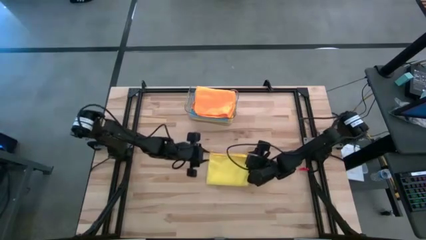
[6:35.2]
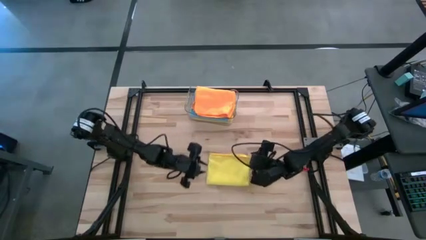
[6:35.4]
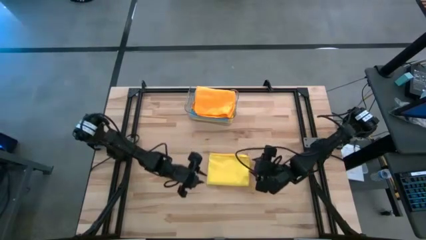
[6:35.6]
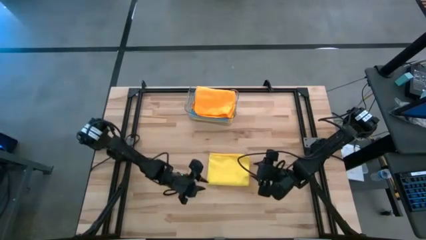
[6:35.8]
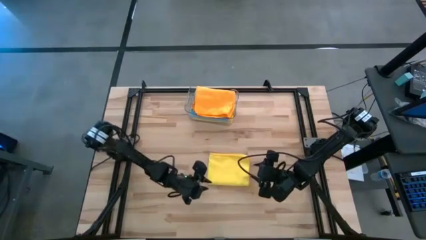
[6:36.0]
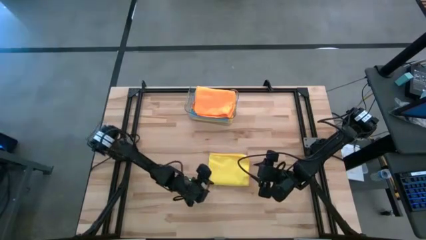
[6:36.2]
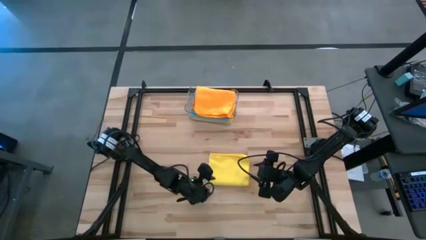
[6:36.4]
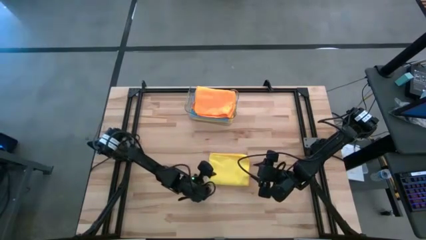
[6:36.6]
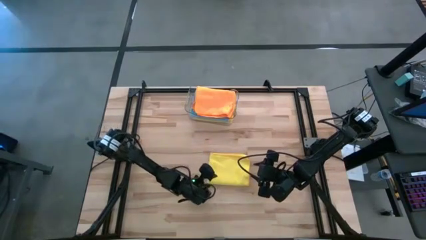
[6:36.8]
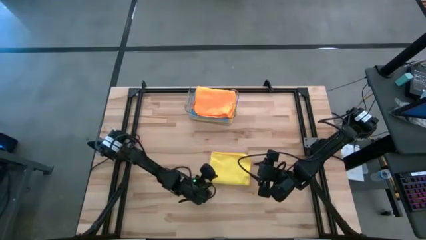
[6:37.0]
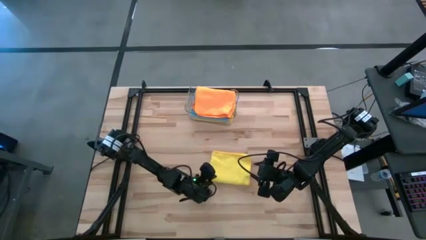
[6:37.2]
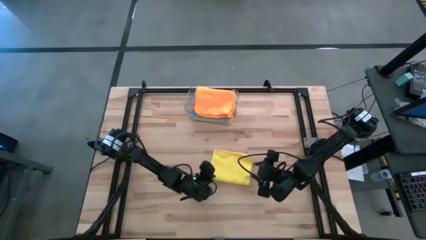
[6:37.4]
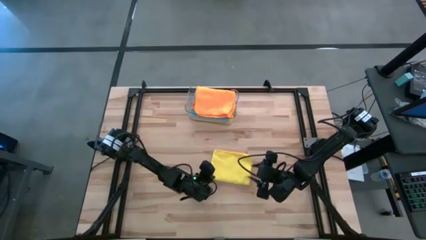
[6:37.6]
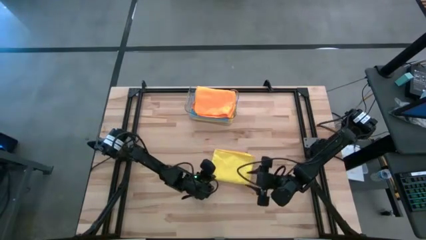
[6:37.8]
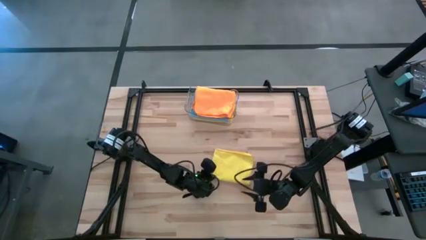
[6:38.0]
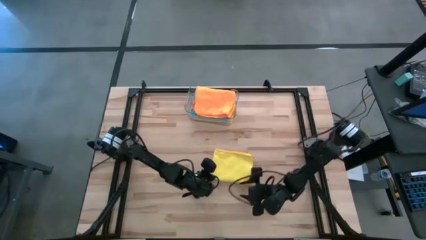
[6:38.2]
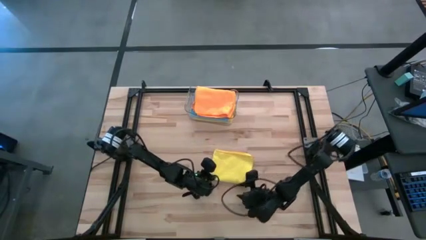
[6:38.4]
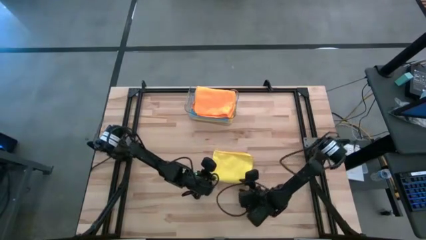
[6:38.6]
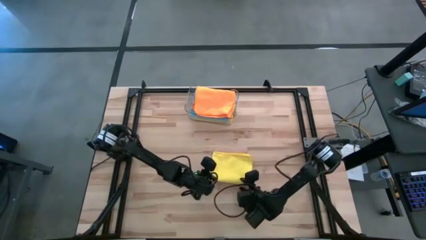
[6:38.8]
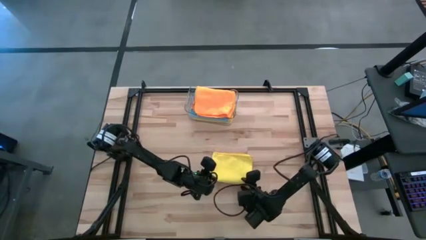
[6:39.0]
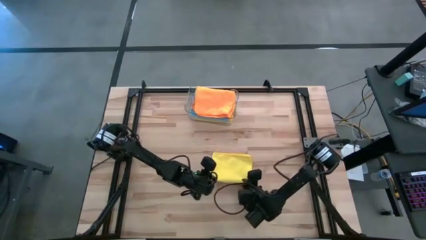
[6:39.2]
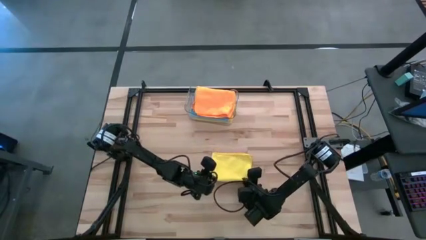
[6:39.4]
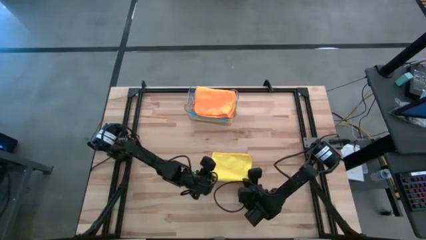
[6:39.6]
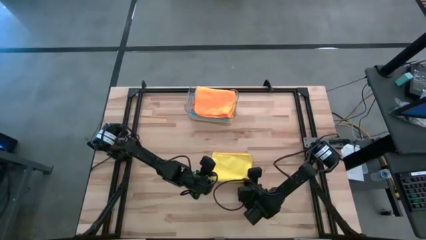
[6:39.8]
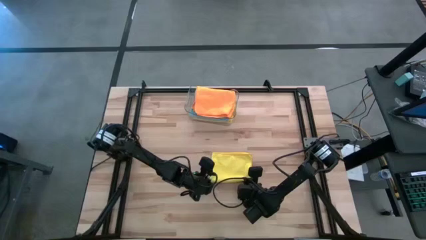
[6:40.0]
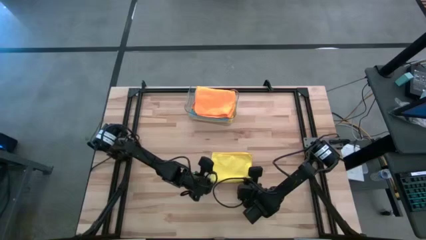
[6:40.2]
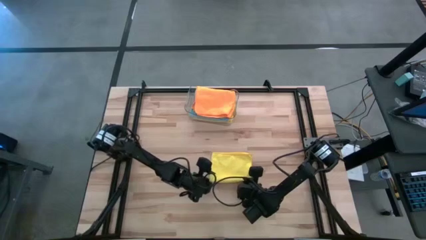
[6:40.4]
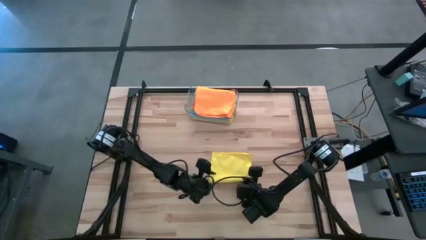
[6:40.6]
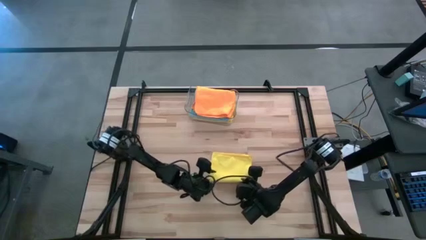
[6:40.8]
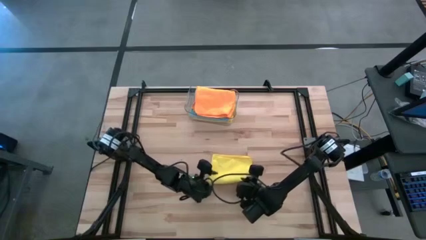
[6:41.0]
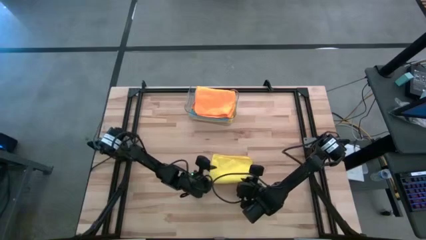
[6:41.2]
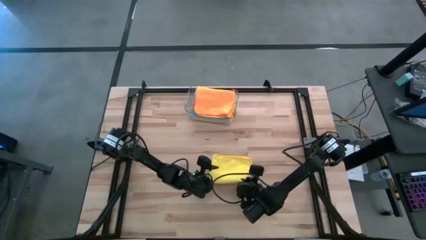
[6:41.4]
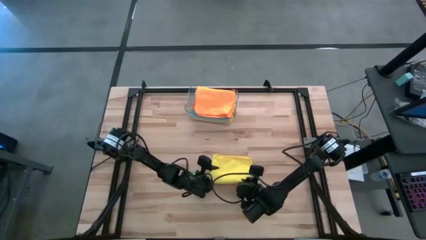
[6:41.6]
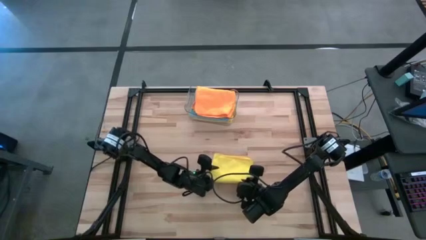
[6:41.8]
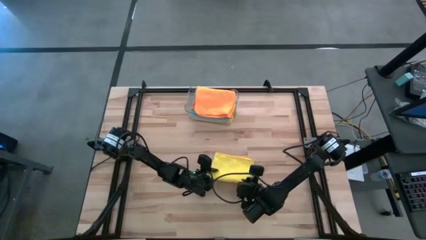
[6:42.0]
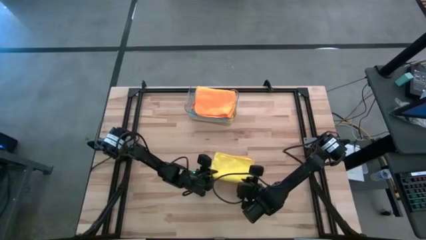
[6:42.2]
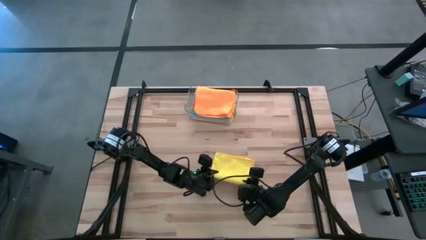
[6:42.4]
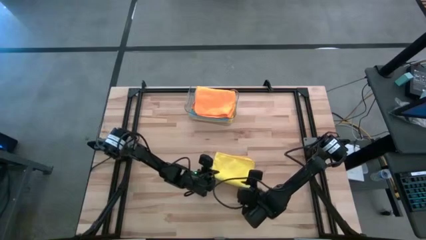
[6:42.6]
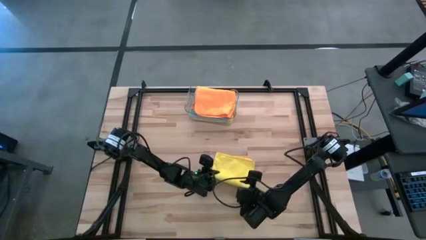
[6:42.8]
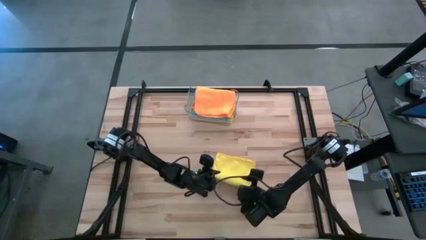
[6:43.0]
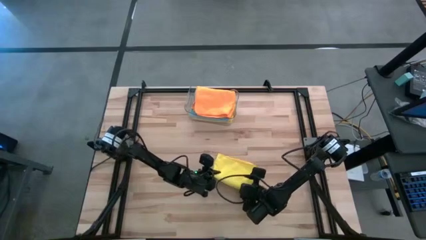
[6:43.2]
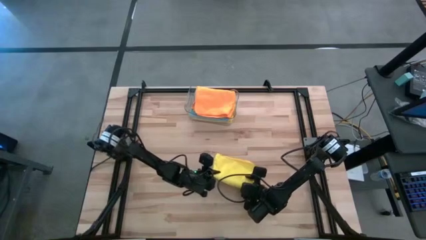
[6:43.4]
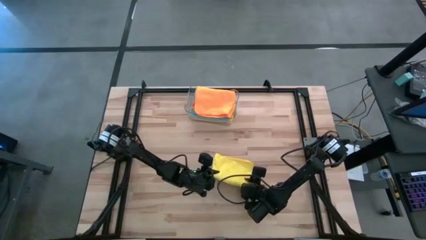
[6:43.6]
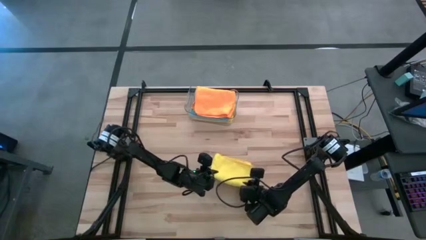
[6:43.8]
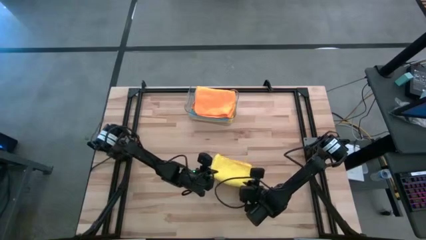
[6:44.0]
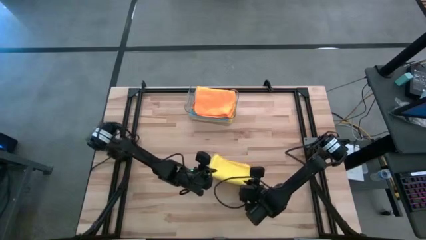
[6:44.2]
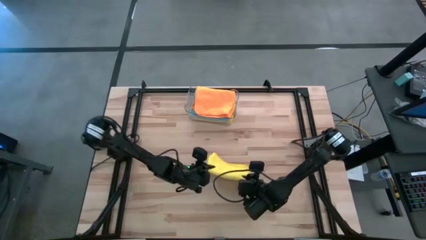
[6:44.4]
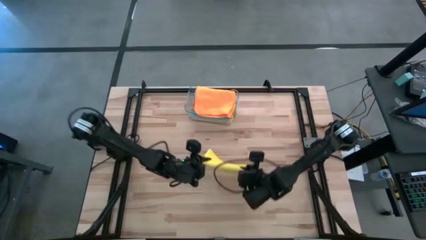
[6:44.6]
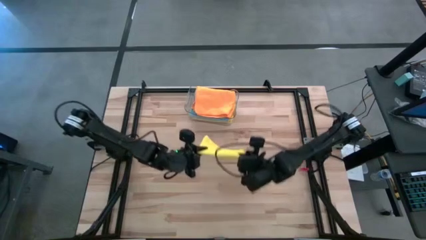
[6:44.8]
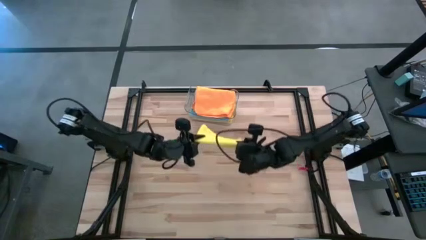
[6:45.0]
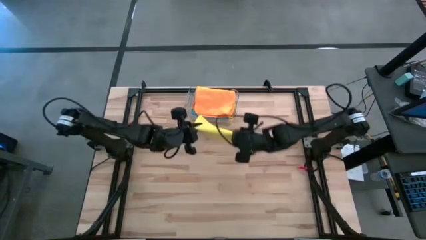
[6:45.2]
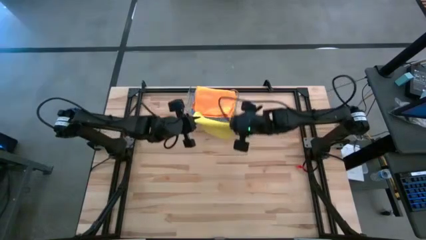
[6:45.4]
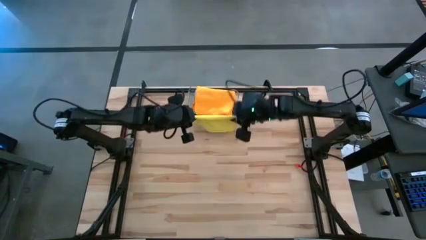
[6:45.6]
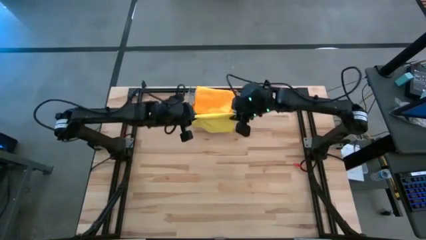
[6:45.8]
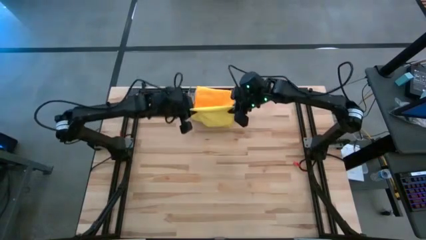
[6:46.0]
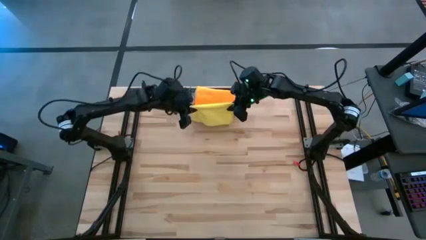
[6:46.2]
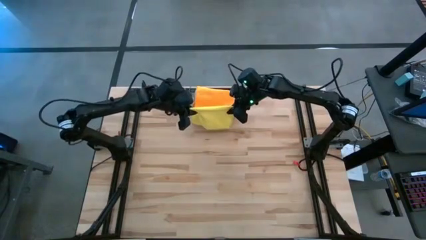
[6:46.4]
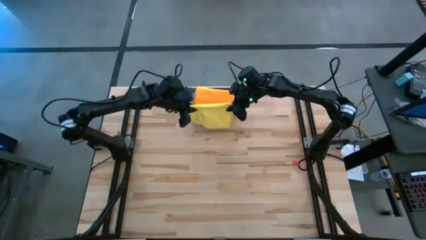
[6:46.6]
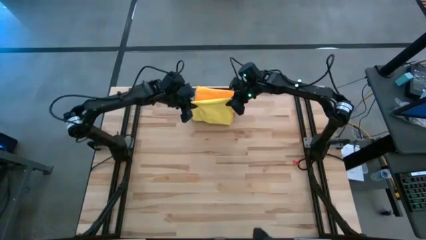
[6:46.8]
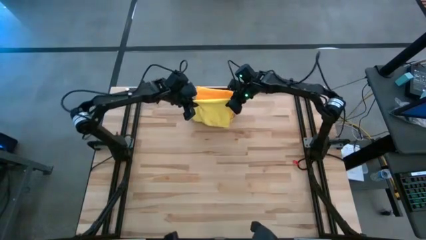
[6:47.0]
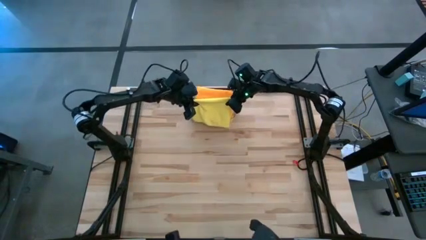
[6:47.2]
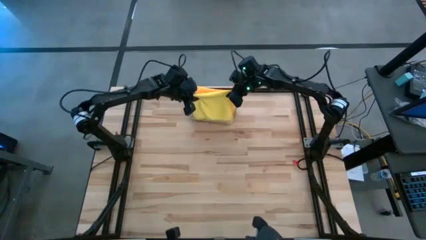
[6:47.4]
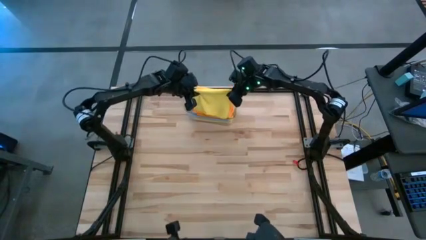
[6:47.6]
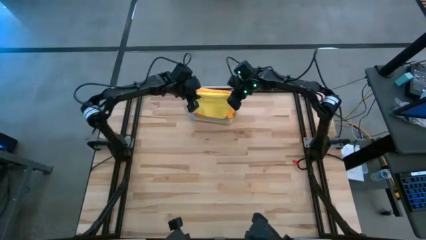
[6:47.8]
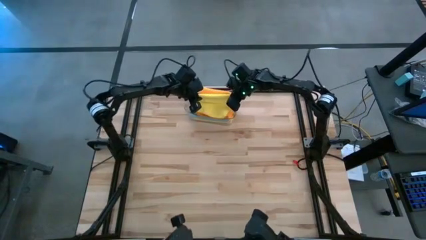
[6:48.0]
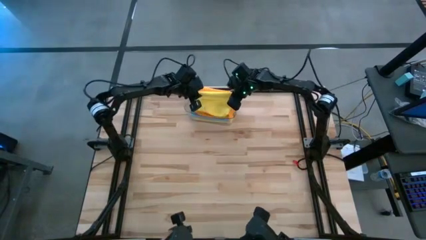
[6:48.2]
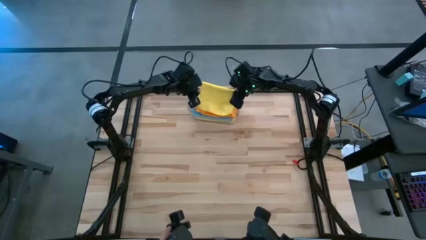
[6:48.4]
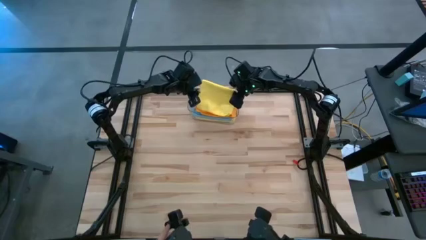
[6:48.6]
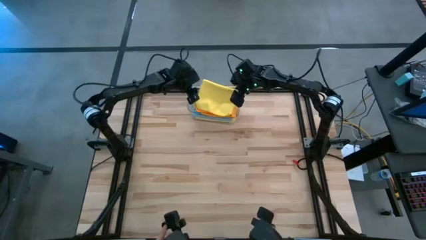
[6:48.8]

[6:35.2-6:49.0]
Task: Fold microfiber towels
Put the top yellow microfiber cloth into the transparent bin
